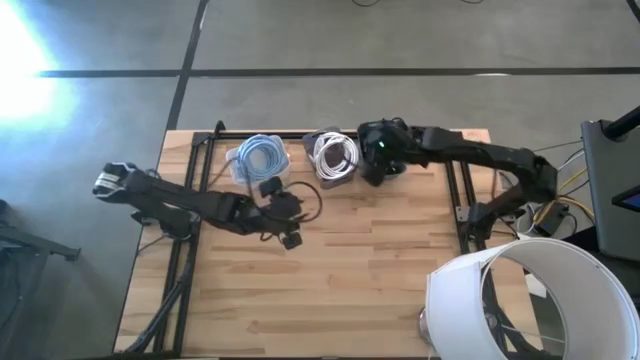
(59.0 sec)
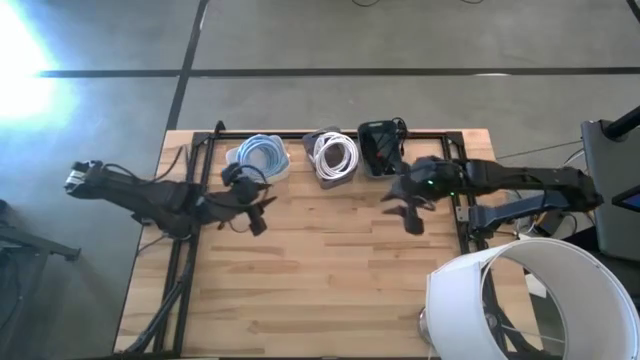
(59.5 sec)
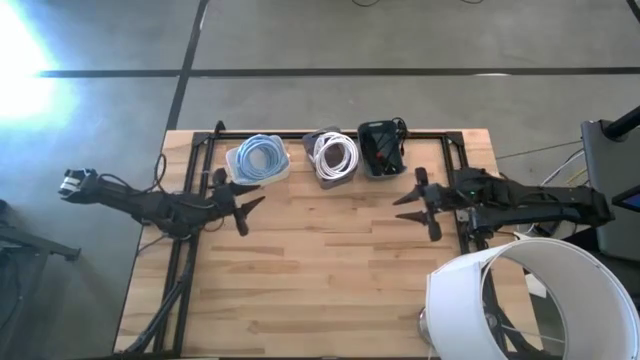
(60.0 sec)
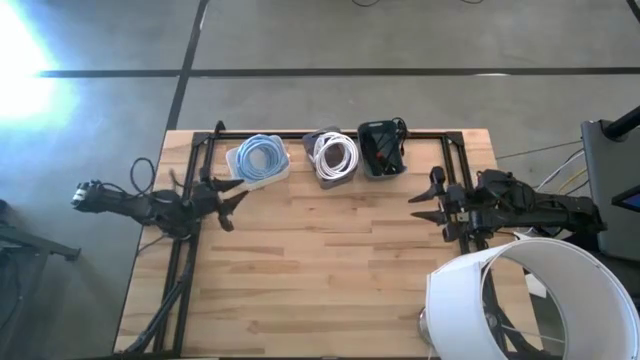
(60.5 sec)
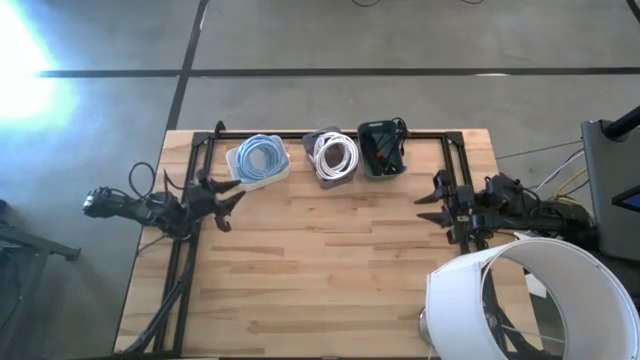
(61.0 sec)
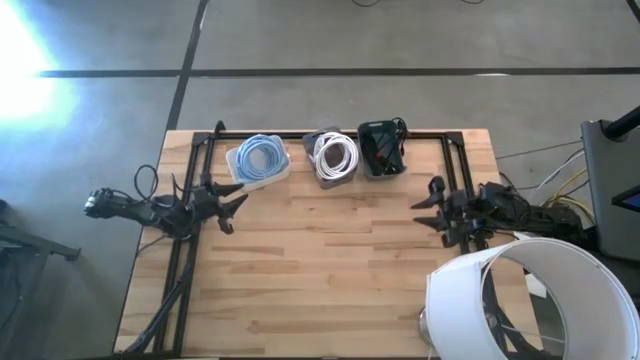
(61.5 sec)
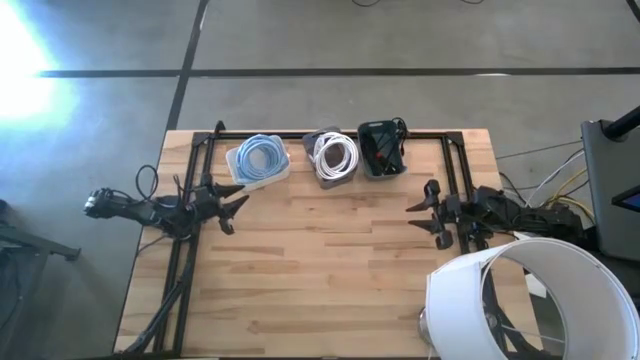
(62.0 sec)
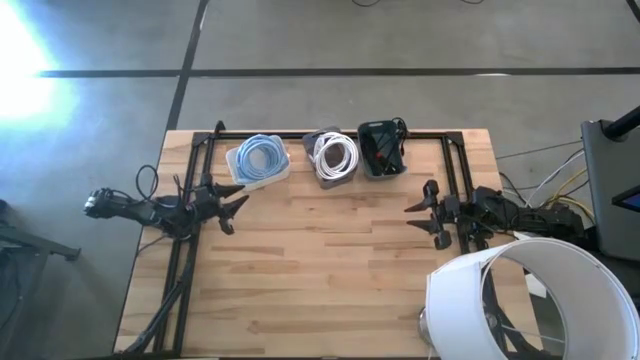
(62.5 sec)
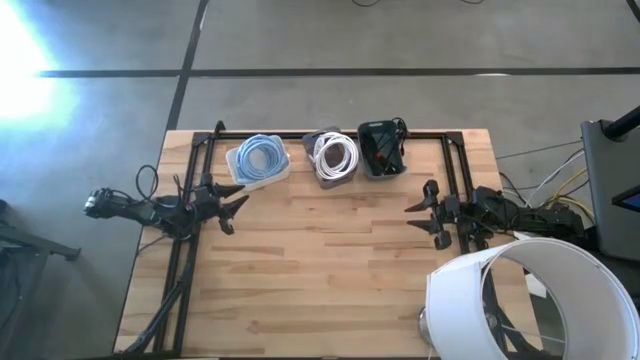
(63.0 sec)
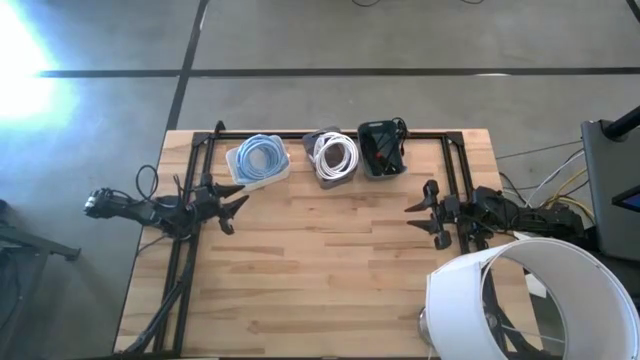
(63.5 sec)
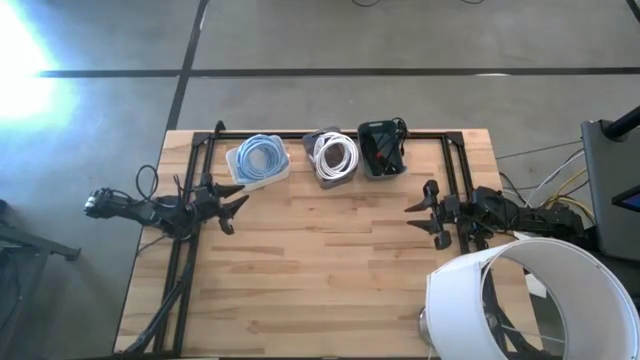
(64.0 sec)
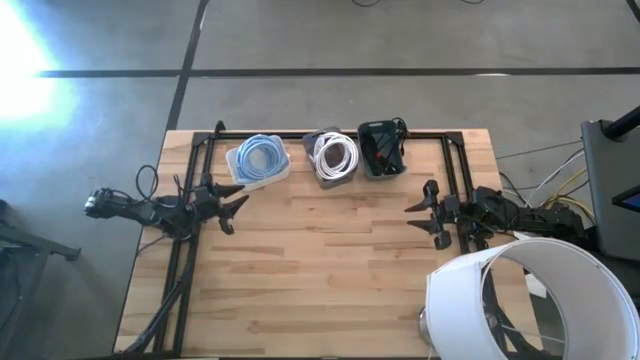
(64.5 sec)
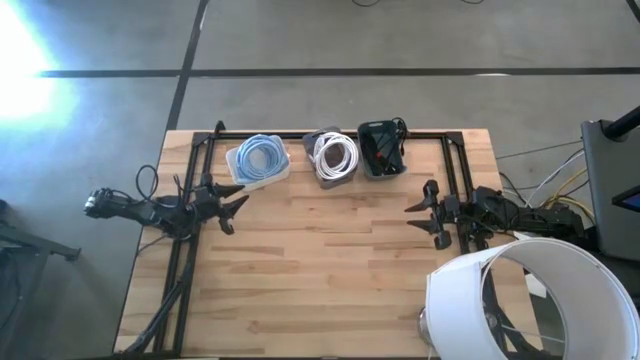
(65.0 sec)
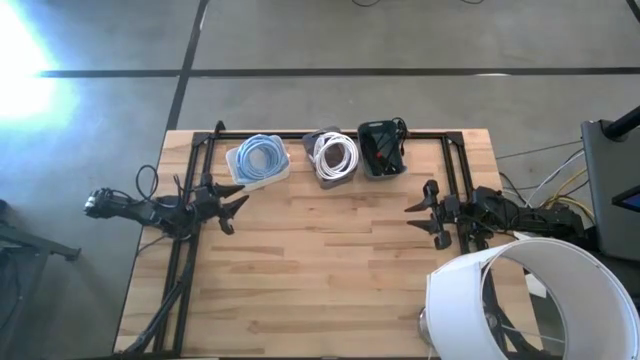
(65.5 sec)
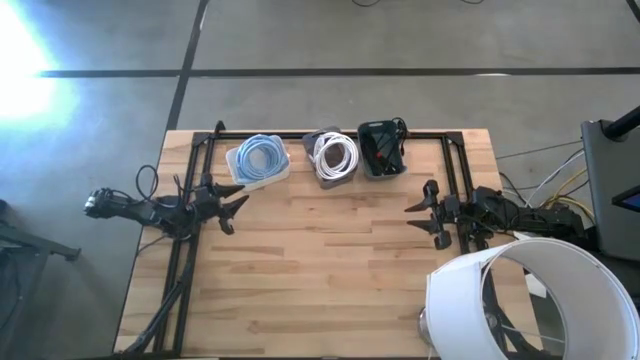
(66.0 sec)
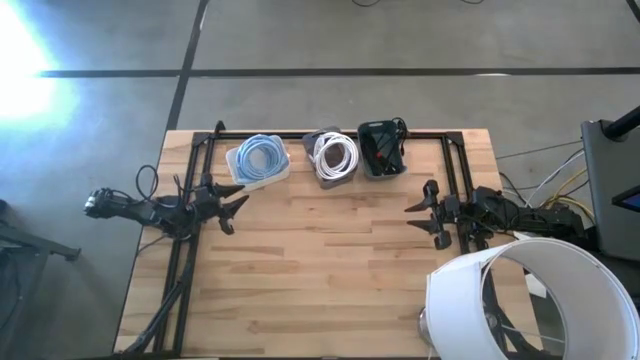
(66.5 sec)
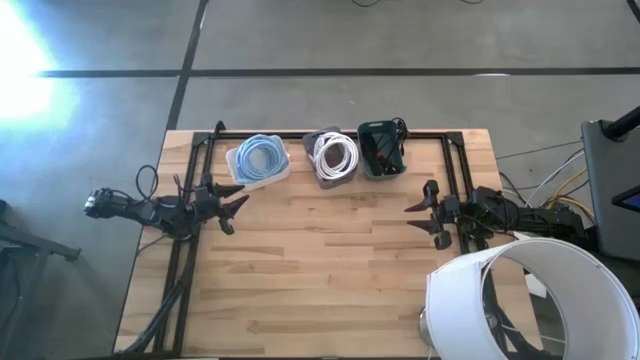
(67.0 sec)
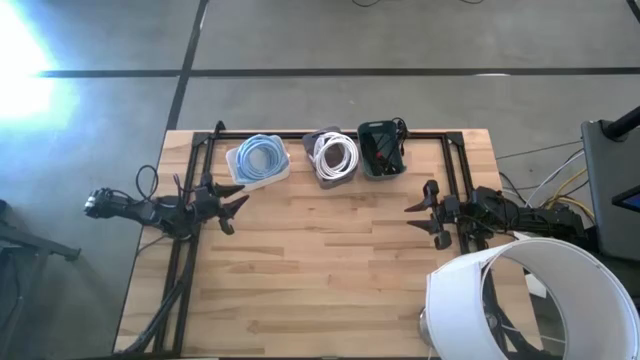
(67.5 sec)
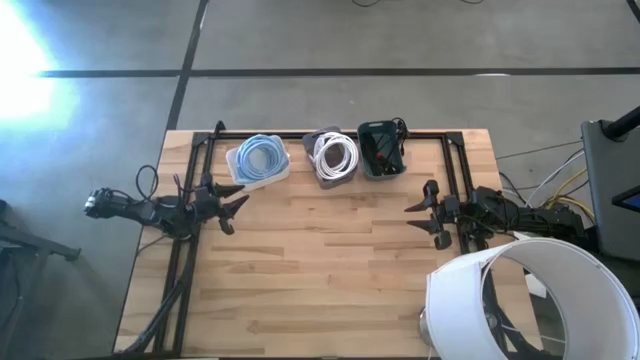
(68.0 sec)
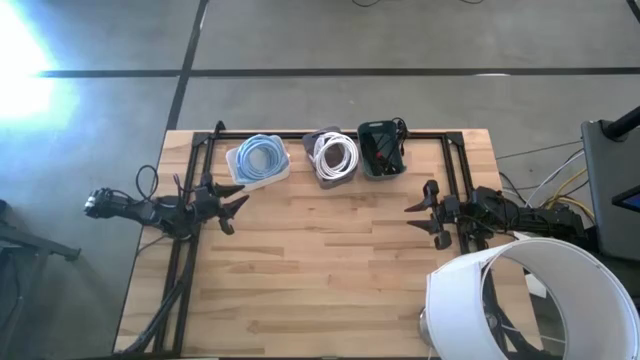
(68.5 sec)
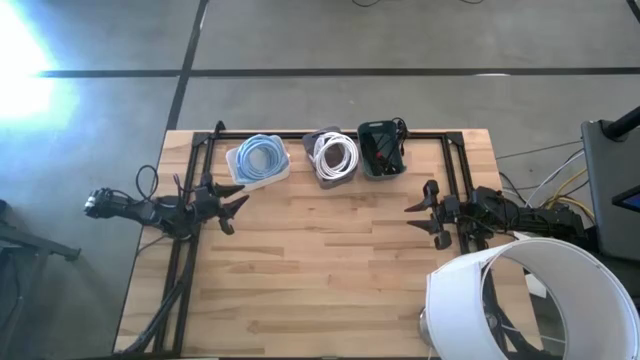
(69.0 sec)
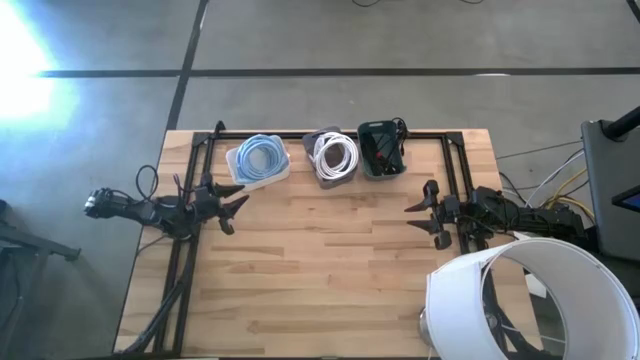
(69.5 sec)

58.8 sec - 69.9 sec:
Task: Pick & Place USB Port
Return to Home Position

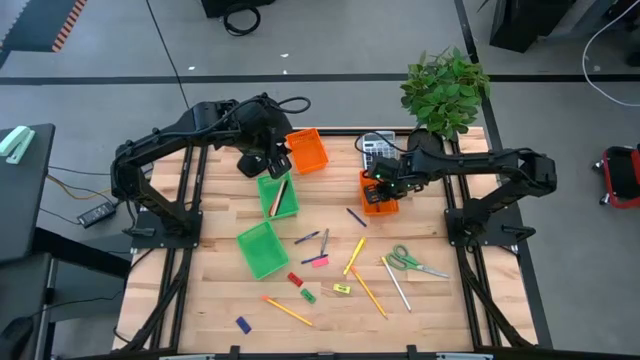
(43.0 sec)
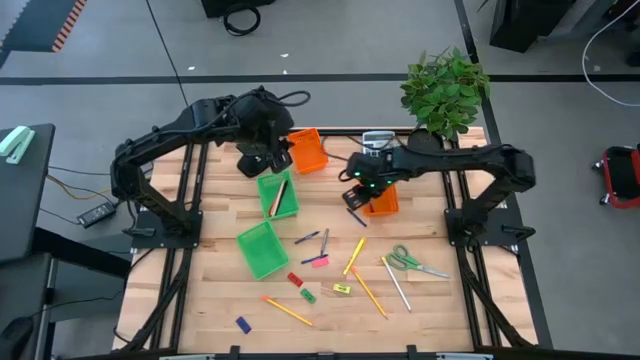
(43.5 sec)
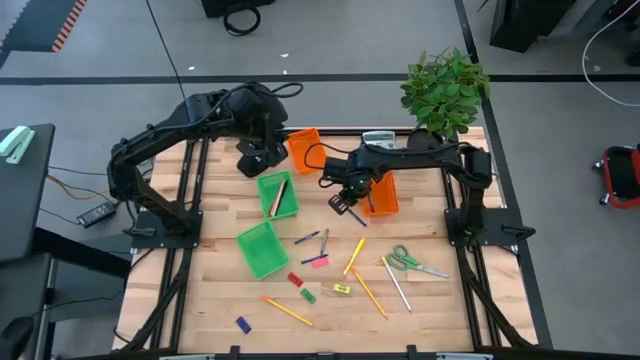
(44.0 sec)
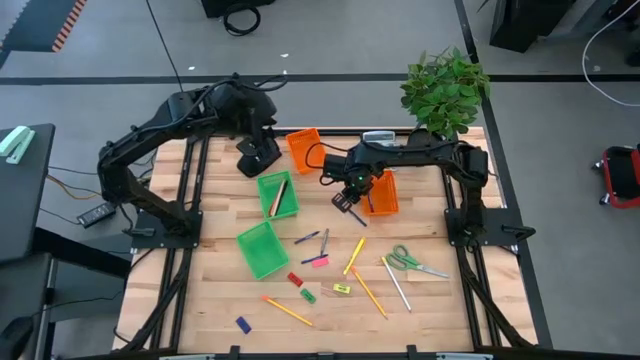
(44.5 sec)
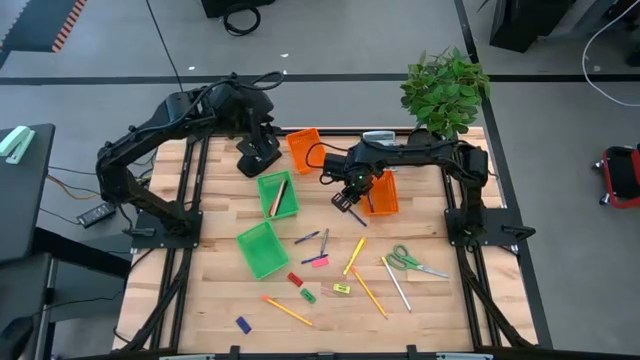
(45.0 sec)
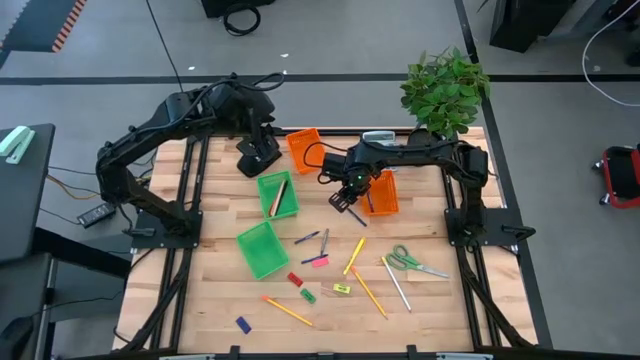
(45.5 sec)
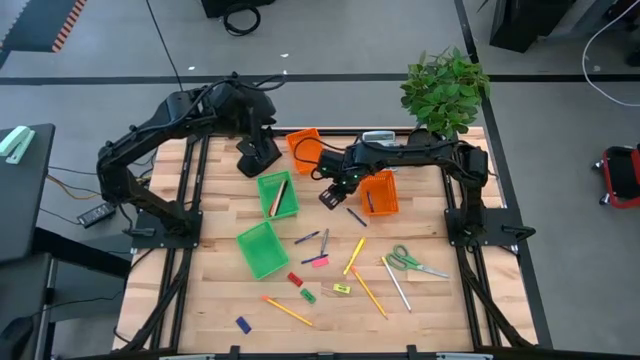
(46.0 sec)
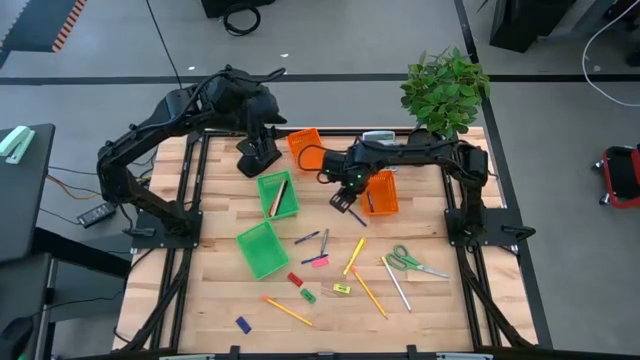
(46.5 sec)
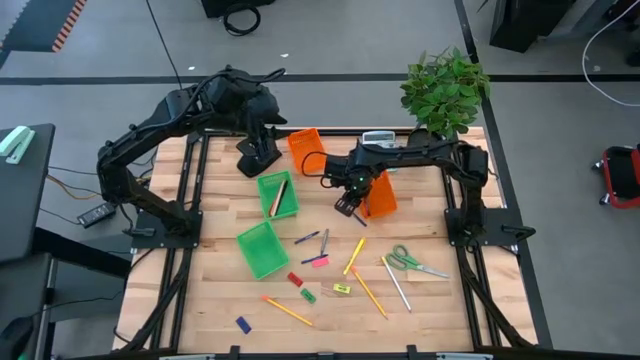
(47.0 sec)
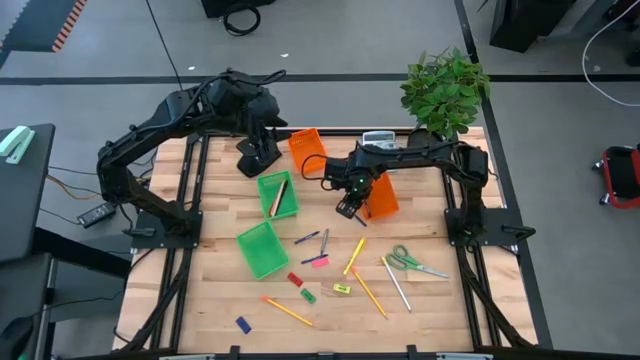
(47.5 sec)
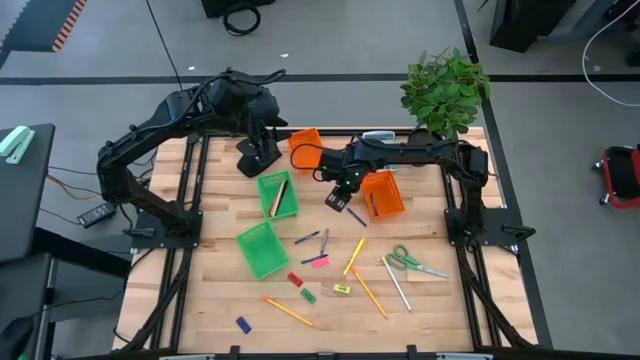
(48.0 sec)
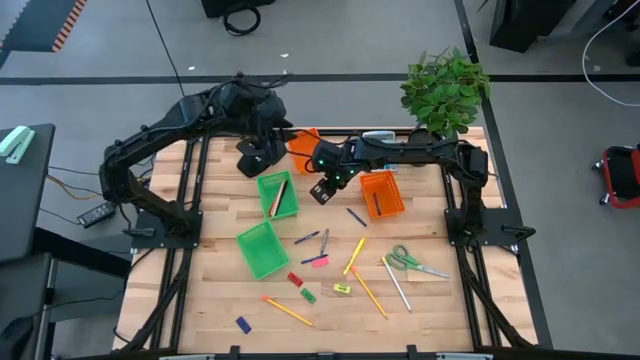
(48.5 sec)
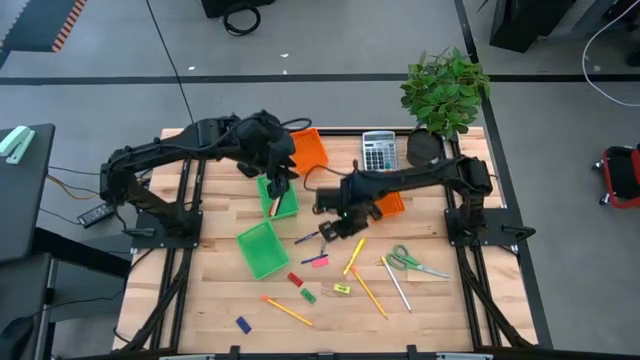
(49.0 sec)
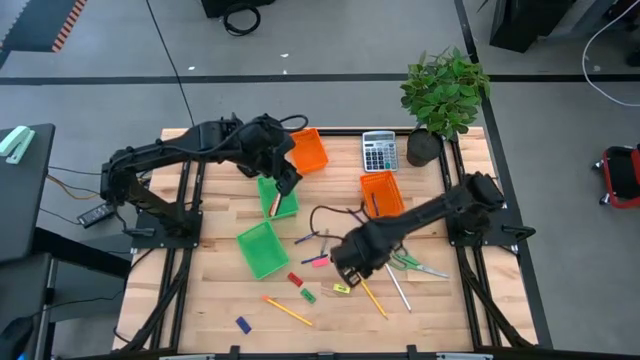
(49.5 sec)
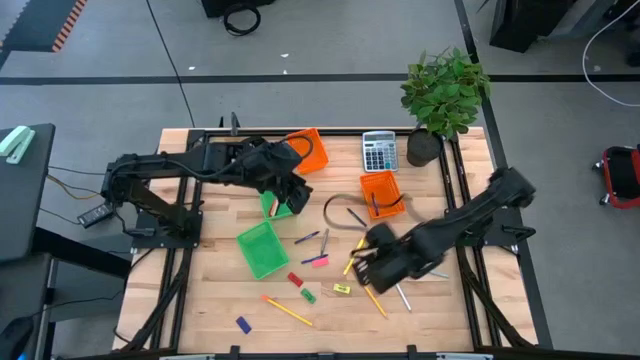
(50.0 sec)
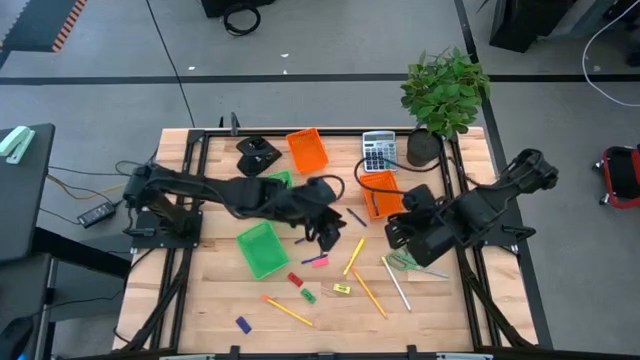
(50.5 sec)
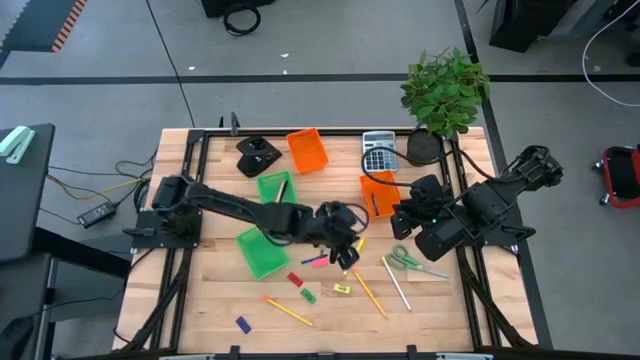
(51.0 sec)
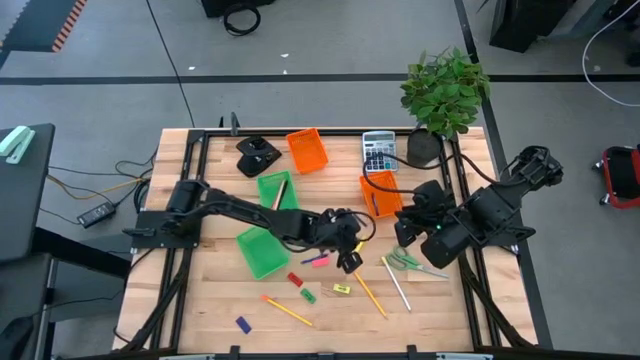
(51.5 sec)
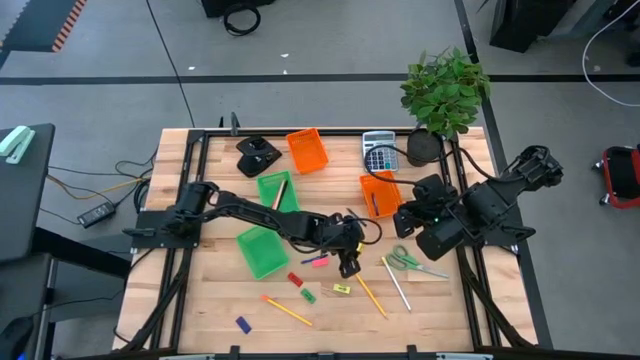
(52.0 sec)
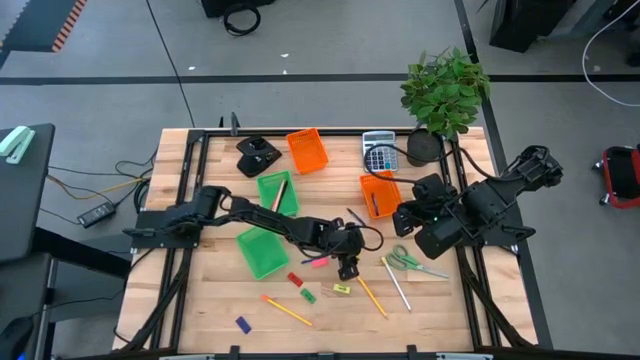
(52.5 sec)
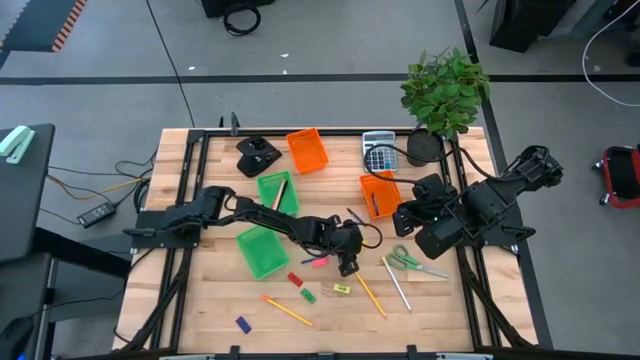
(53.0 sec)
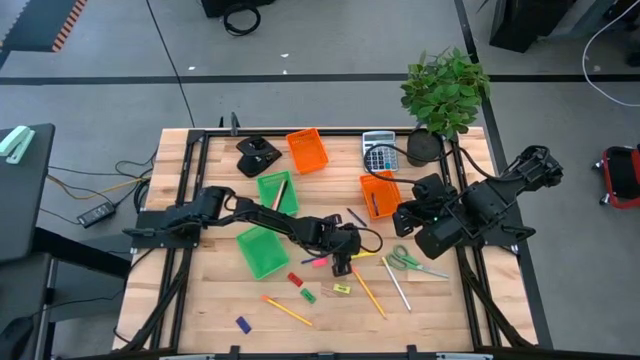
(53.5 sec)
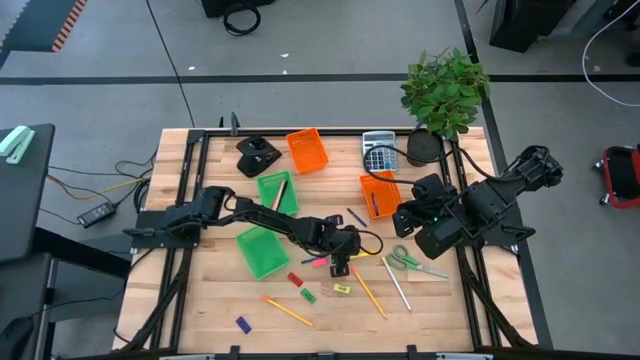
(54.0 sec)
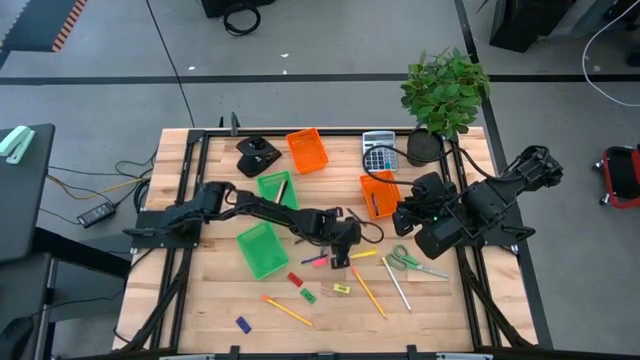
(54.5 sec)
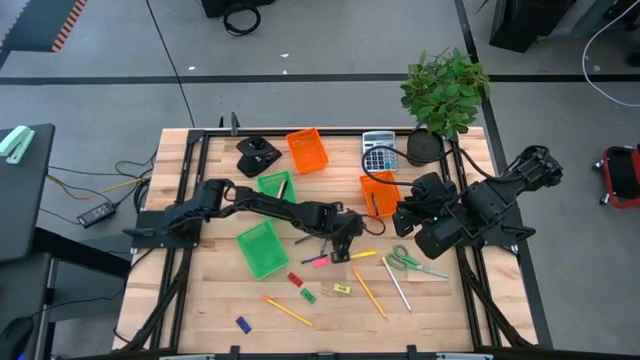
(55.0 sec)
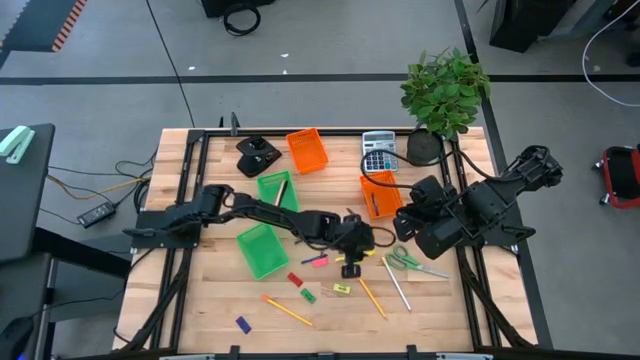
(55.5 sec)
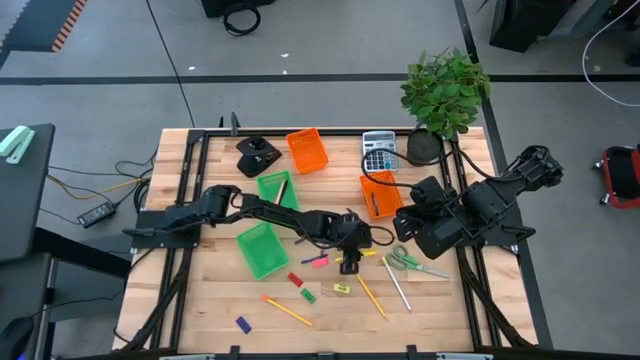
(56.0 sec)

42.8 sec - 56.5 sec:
Task: Sort crayons/erasers/pens/pencils in bins
Put the yellow pen into the top green bin
